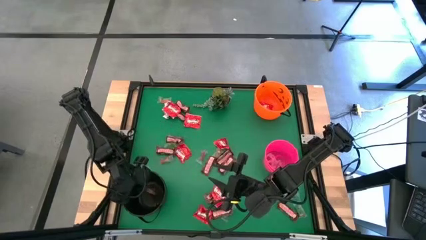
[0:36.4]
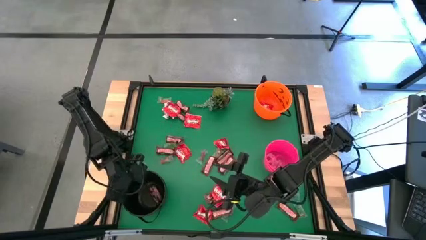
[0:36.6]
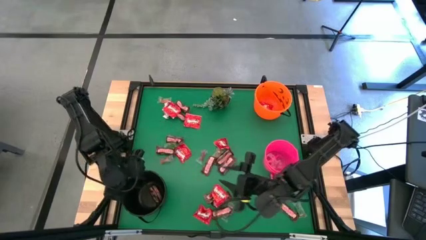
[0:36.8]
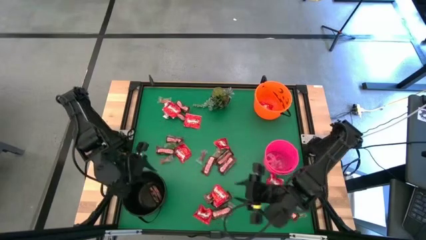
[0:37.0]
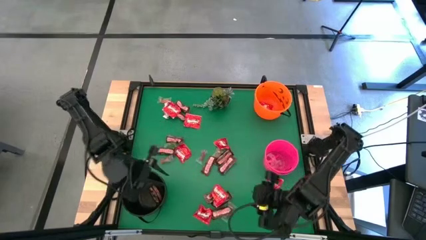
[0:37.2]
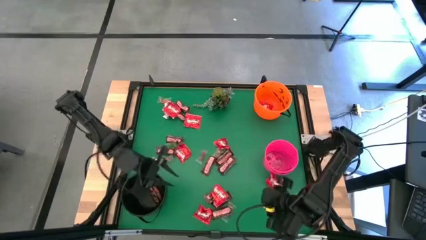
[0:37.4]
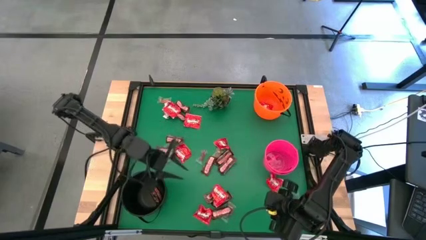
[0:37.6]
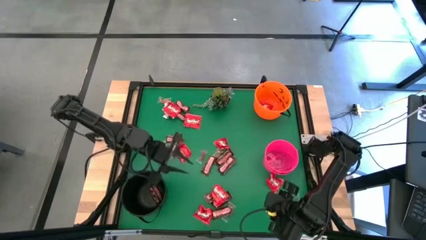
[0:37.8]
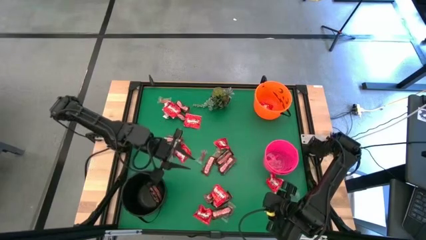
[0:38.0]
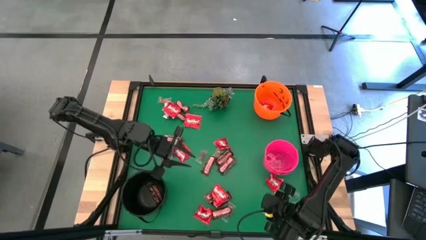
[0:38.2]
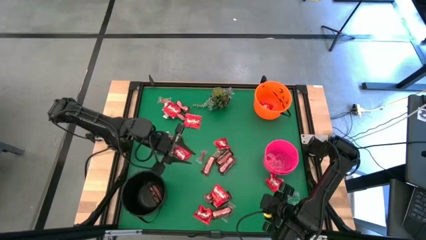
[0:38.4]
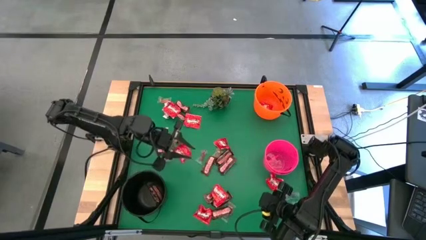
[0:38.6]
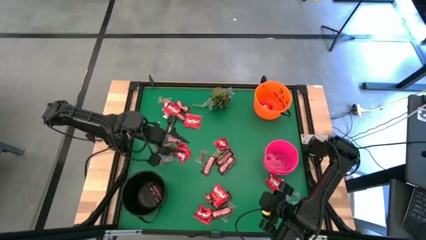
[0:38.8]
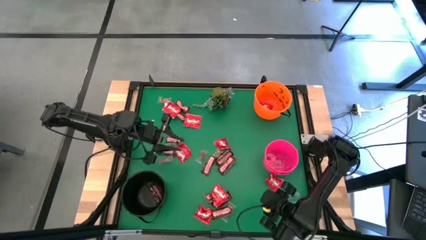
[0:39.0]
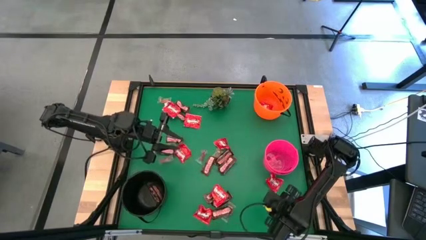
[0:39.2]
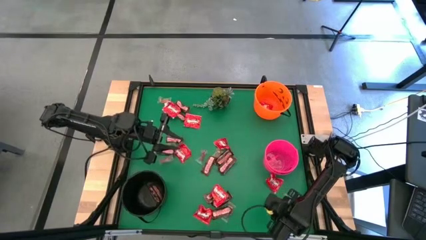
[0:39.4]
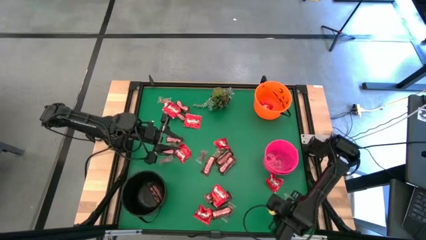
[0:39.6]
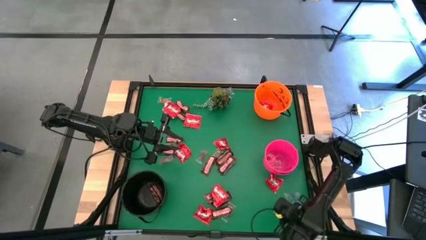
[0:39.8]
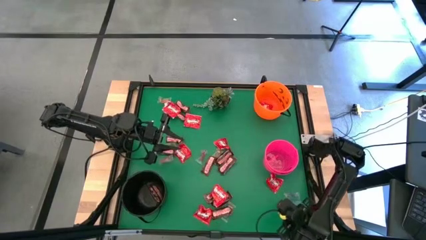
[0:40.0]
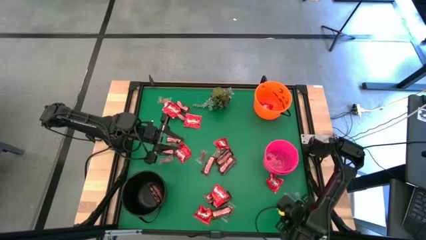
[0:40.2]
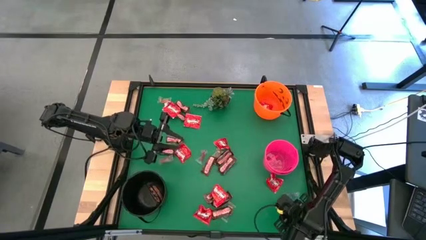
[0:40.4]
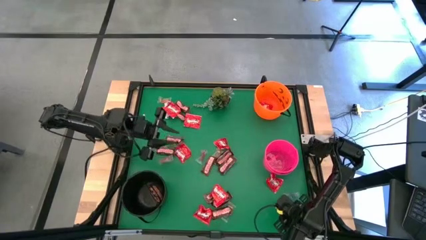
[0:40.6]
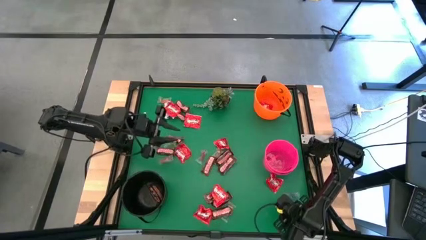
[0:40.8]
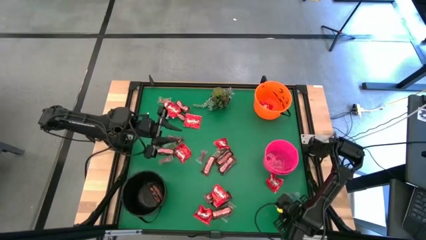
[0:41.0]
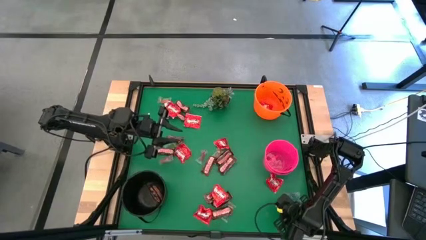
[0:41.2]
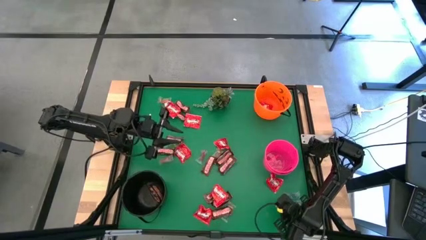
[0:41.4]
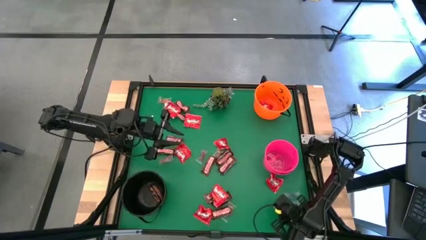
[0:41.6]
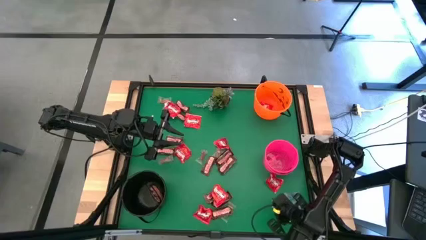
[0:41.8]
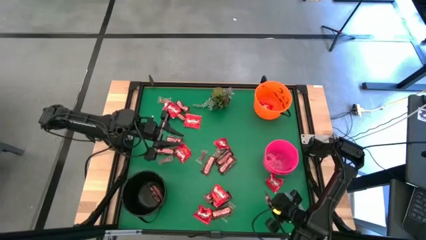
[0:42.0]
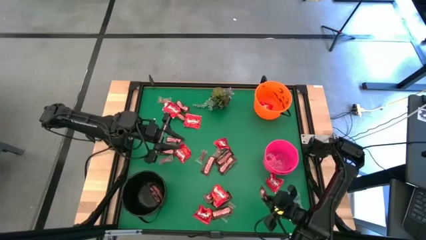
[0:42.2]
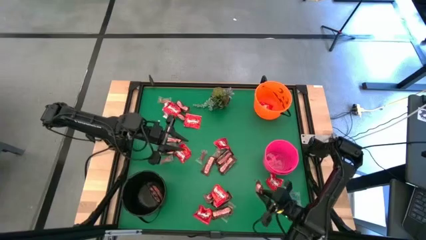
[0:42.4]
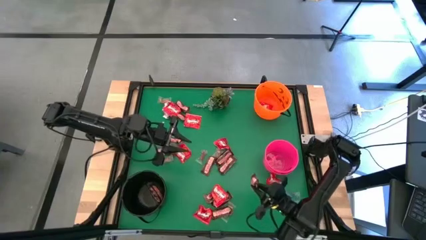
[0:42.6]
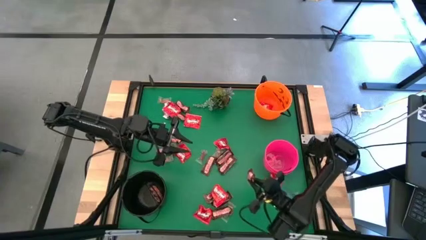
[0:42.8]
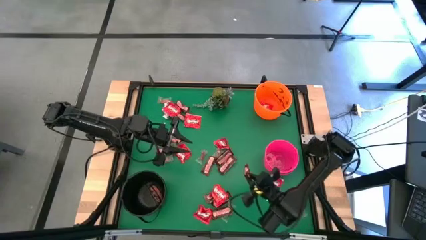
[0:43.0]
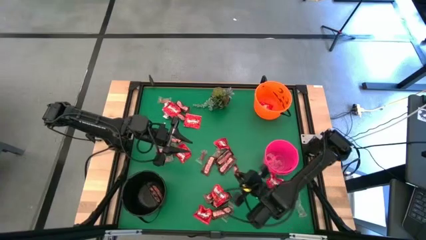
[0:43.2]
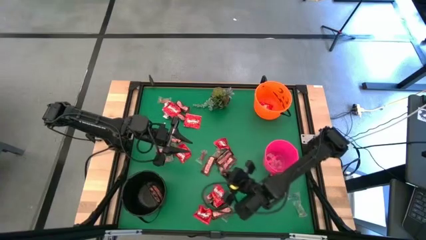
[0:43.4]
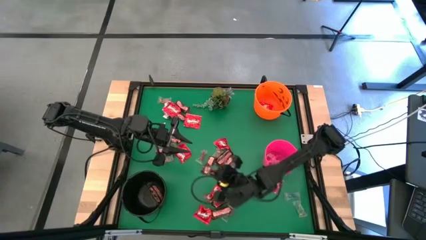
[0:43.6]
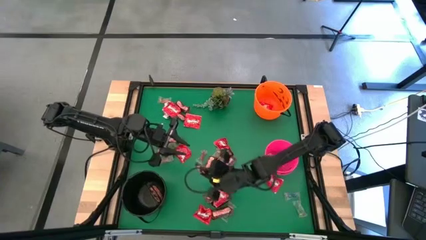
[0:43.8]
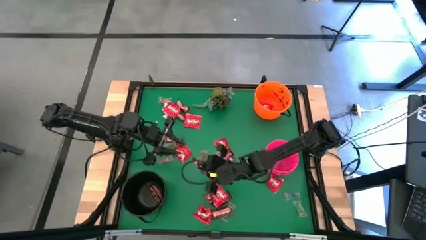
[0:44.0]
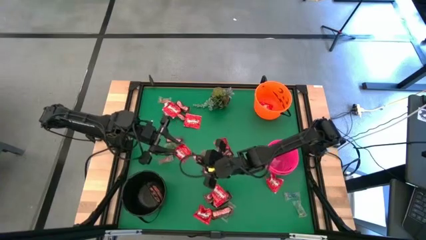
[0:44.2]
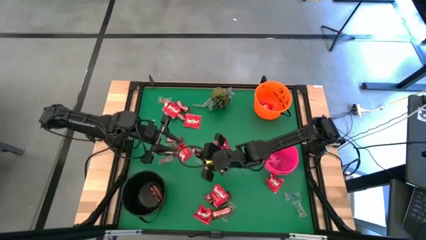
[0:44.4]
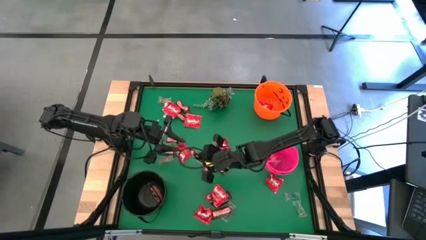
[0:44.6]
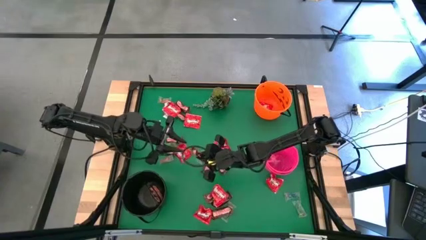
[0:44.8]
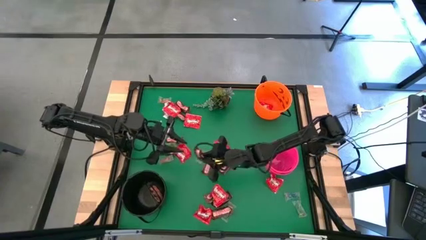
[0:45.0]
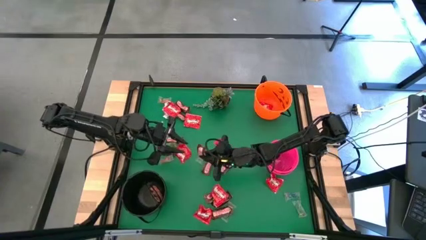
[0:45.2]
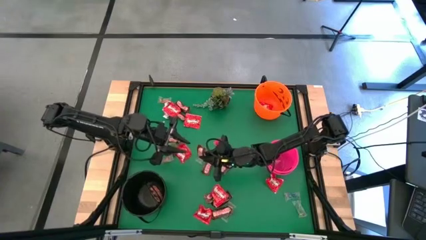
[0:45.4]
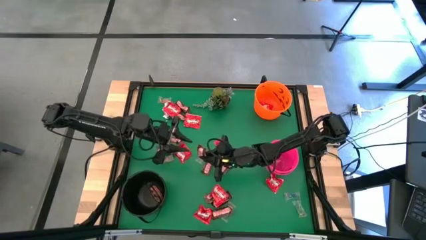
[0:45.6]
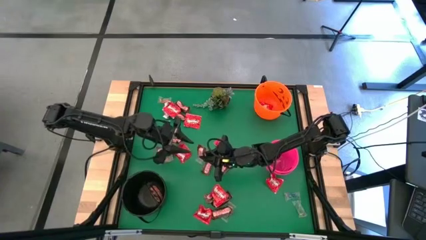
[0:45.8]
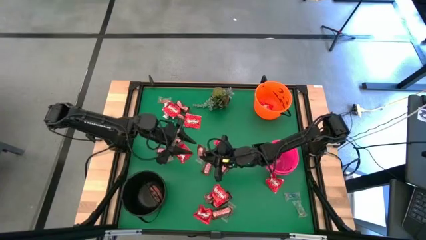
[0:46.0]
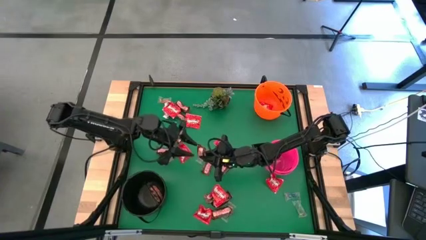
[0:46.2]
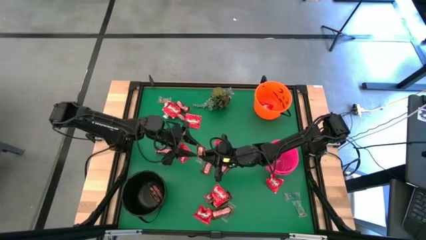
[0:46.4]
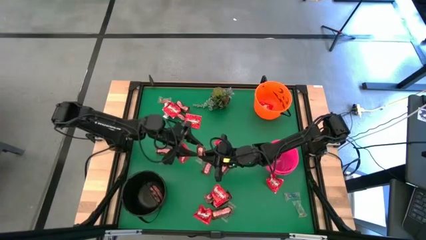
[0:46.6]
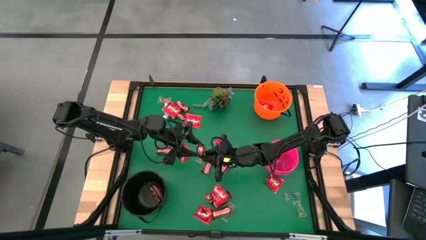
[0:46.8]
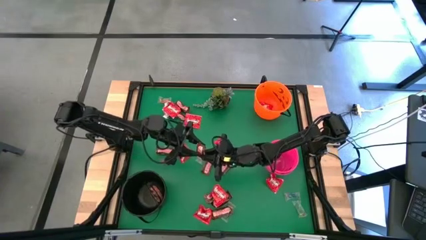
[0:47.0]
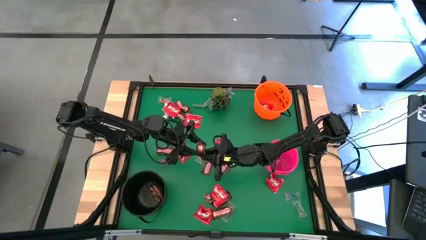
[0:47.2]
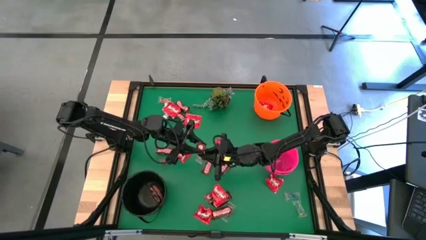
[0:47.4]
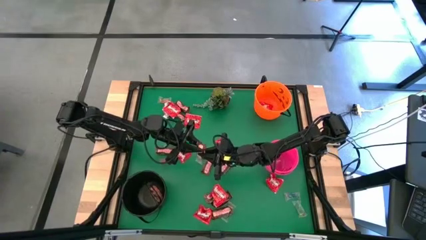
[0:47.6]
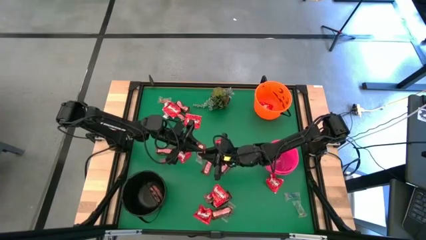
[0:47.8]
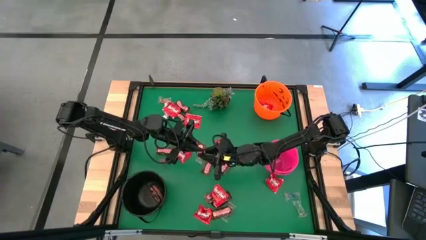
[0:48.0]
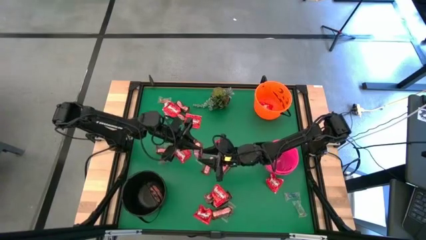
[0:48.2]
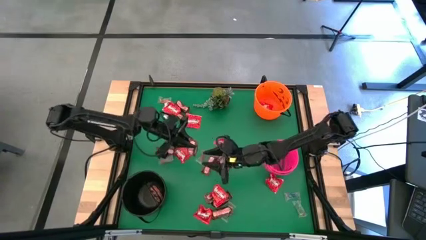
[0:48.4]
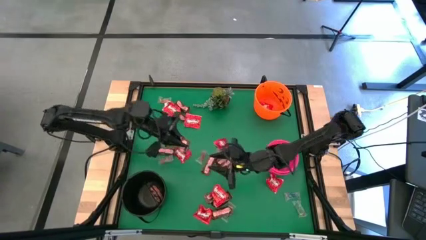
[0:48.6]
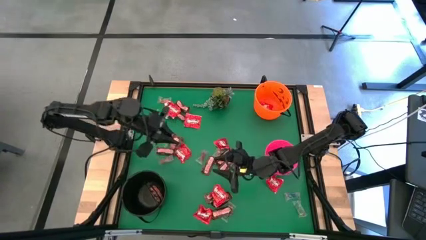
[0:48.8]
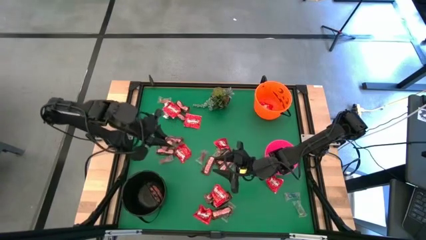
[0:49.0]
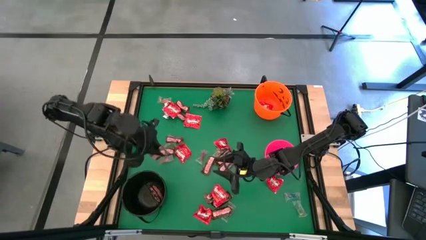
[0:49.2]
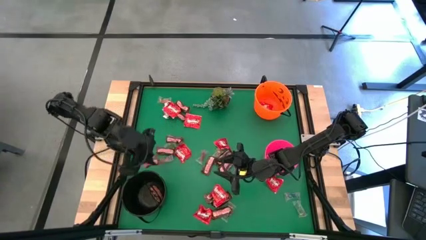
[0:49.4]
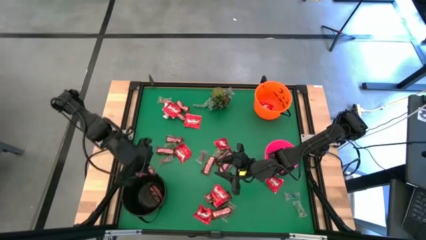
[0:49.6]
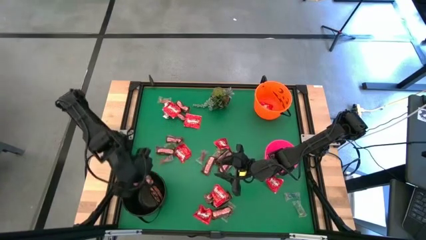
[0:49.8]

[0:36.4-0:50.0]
Task: Sort candy
Put the brown chocolate bar into the black bucket

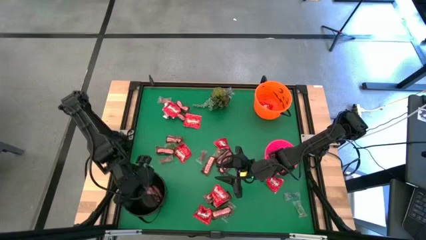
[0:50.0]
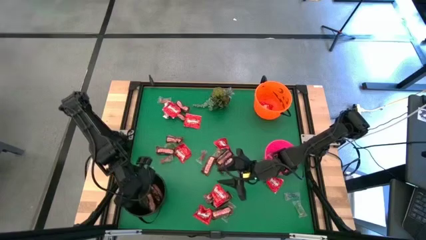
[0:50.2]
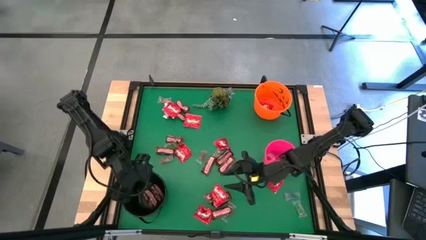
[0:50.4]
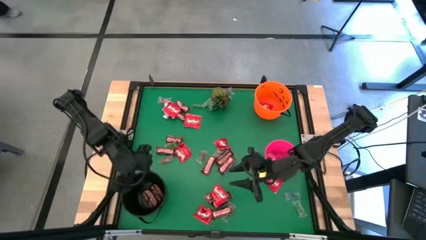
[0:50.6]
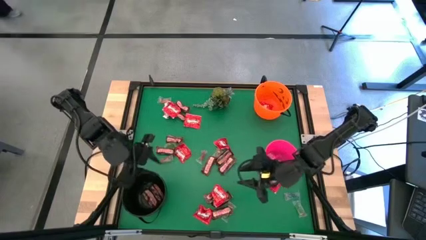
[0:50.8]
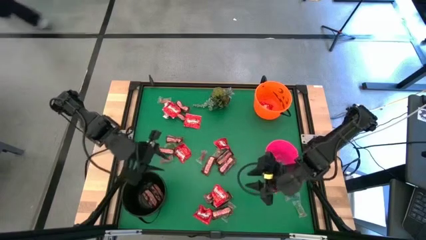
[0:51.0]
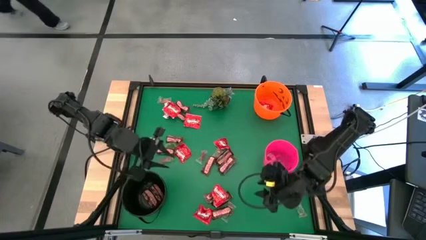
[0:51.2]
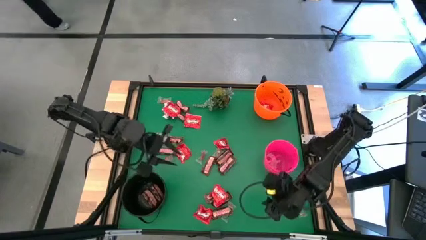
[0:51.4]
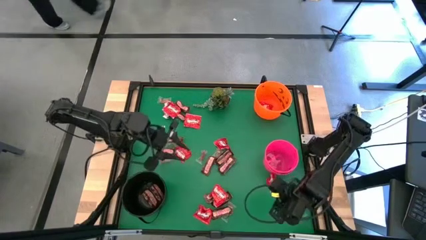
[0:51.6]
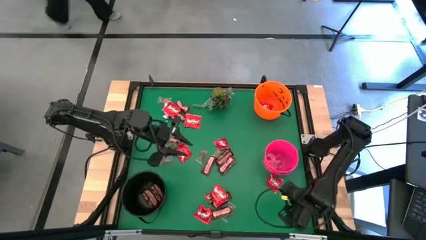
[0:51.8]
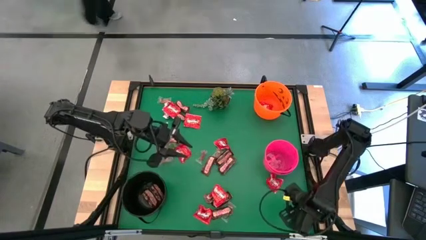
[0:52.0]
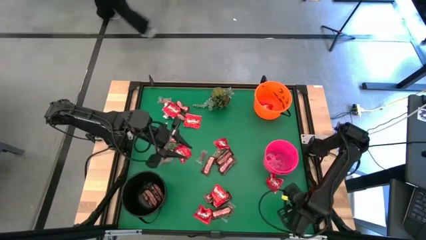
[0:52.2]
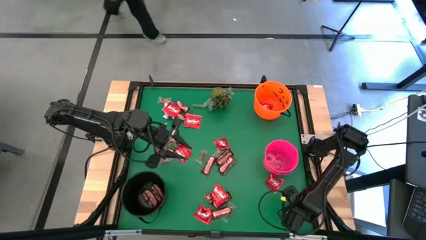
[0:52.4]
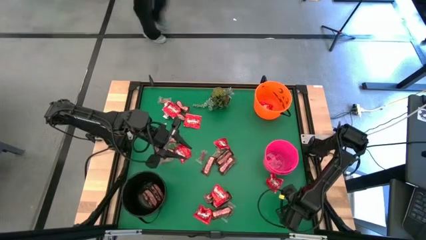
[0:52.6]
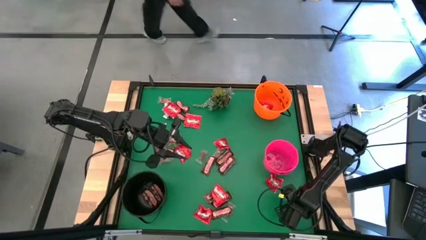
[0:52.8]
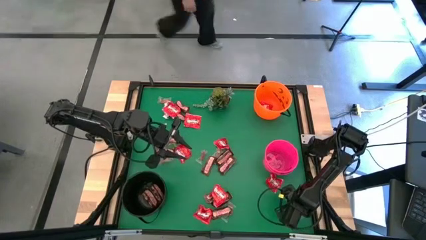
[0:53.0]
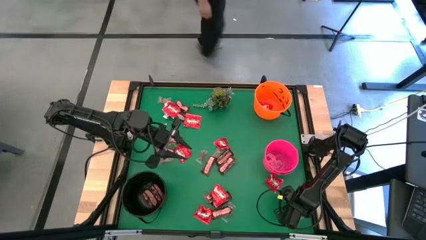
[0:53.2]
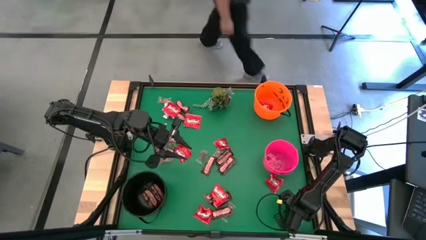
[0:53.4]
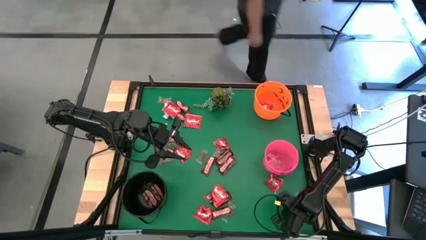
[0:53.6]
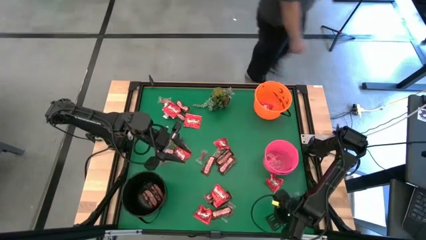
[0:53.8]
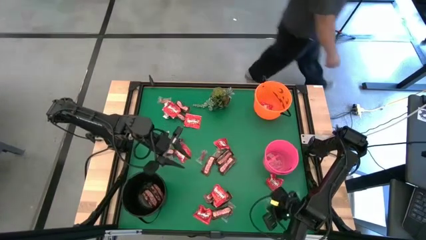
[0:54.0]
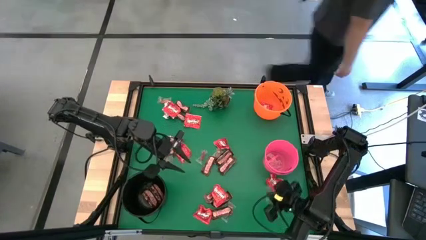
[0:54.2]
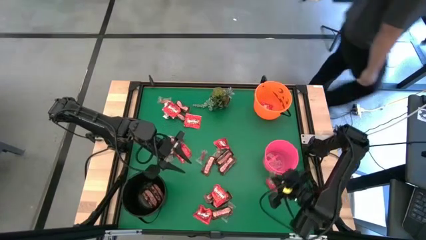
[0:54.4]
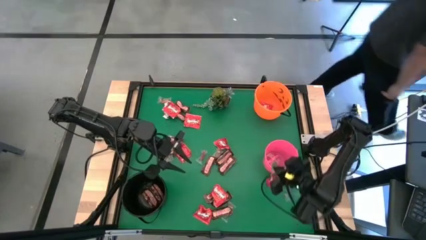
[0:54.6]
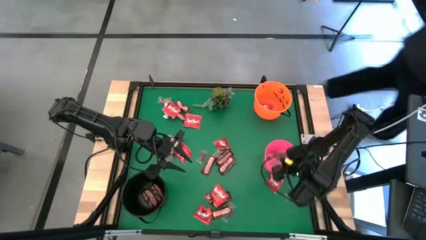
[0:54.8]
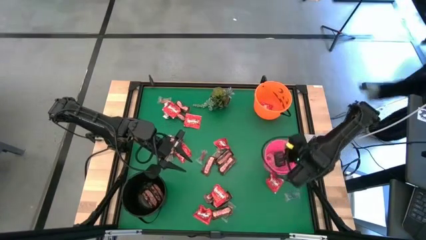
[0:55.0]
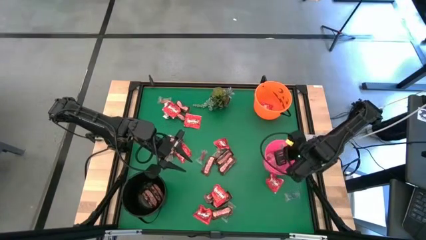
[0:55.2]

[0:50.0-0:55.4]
Put the green candy into the pink bucket
